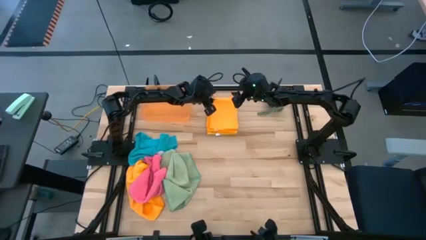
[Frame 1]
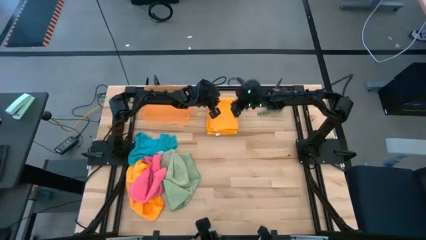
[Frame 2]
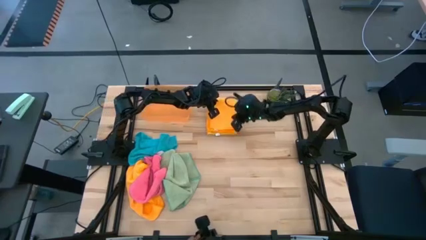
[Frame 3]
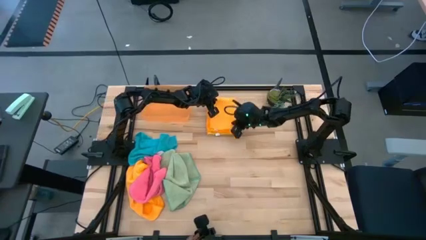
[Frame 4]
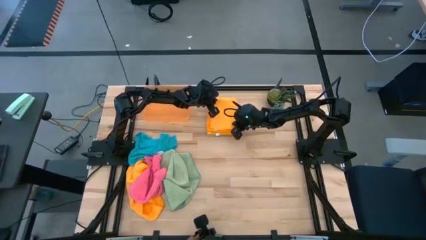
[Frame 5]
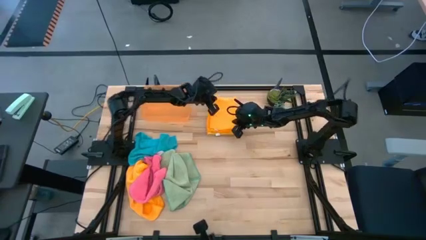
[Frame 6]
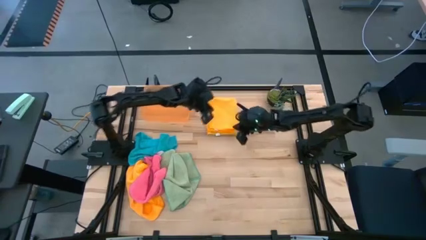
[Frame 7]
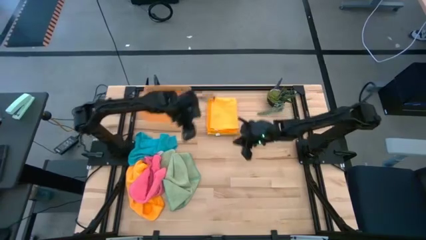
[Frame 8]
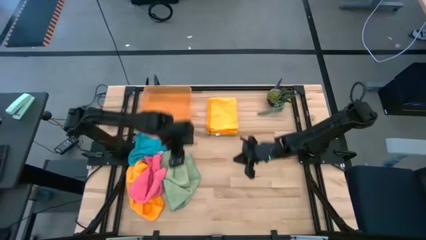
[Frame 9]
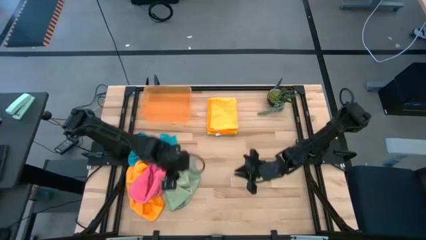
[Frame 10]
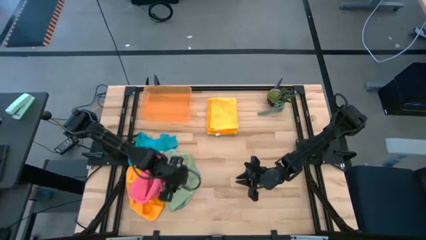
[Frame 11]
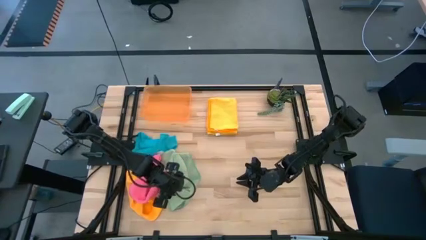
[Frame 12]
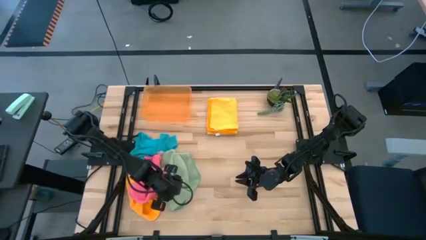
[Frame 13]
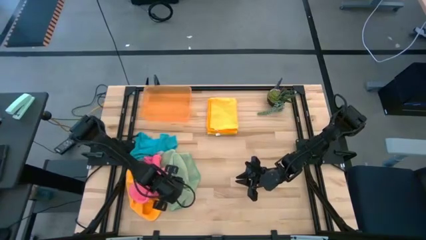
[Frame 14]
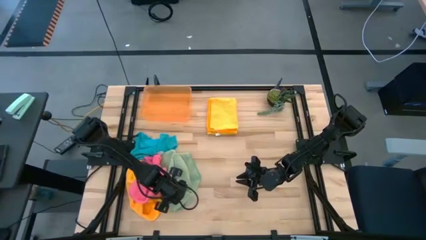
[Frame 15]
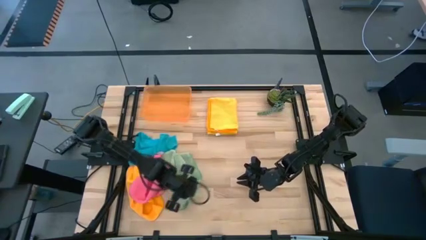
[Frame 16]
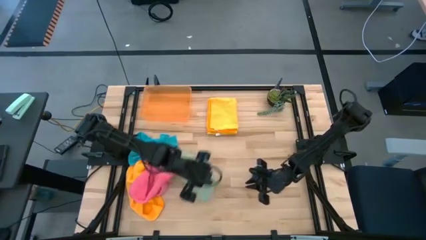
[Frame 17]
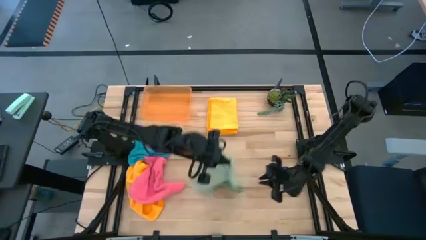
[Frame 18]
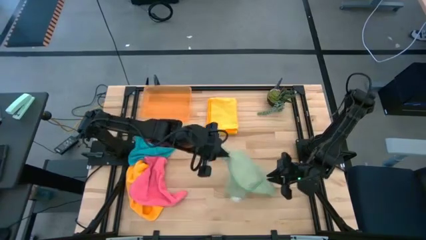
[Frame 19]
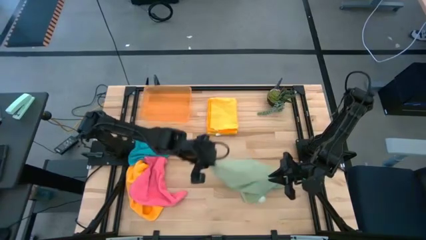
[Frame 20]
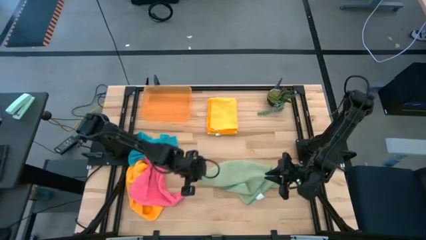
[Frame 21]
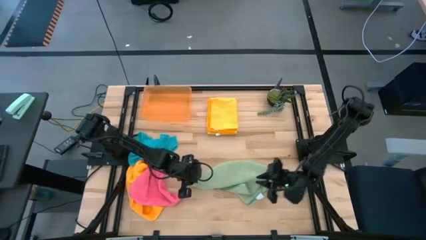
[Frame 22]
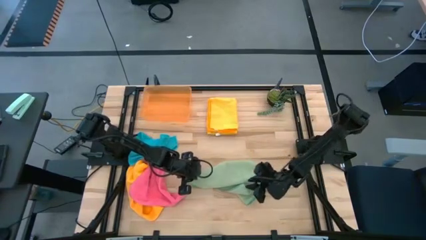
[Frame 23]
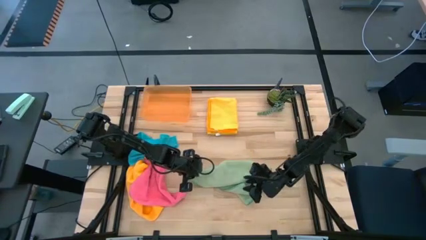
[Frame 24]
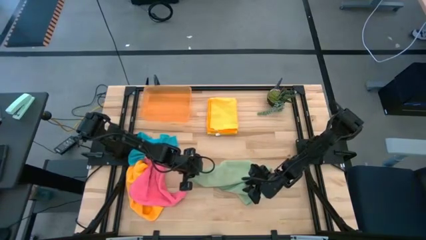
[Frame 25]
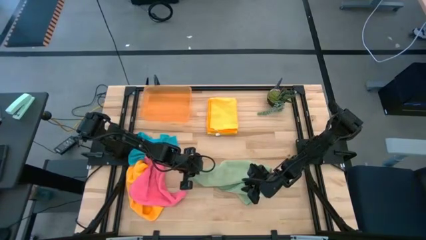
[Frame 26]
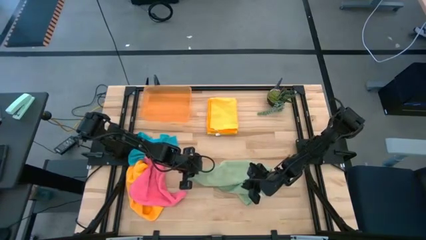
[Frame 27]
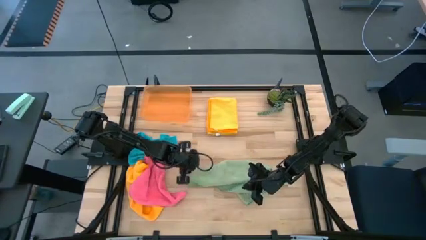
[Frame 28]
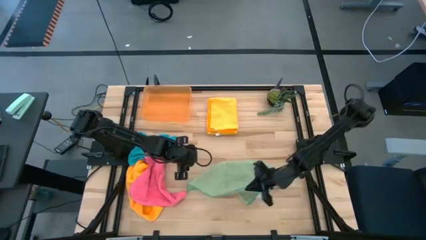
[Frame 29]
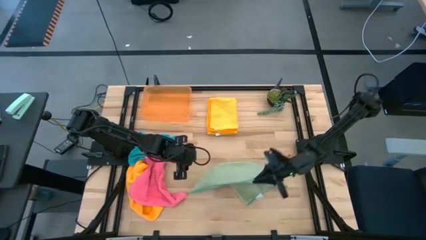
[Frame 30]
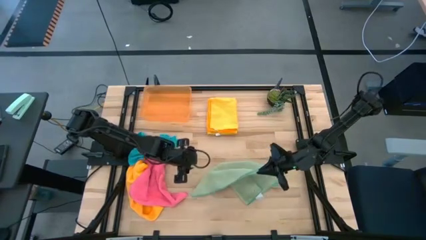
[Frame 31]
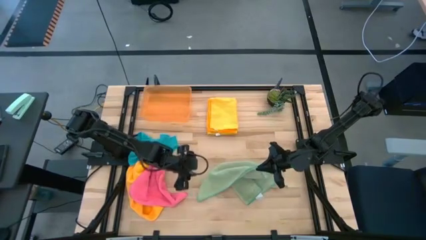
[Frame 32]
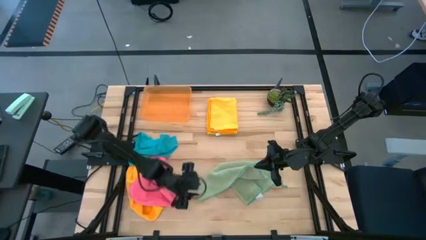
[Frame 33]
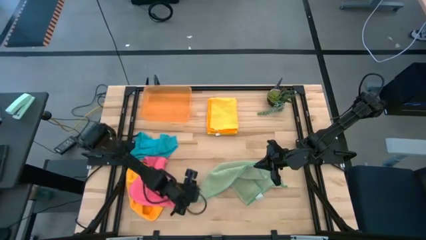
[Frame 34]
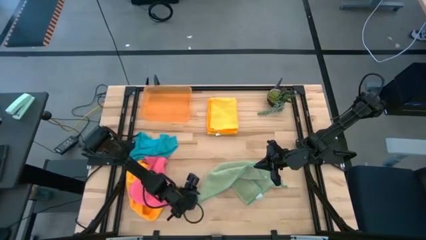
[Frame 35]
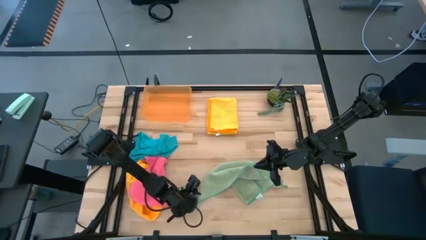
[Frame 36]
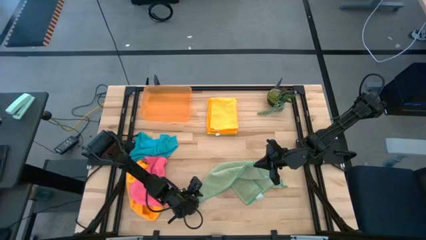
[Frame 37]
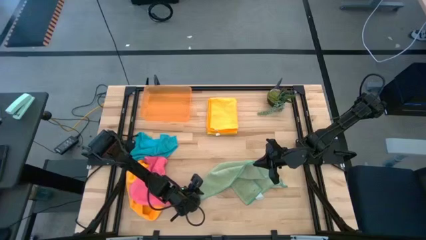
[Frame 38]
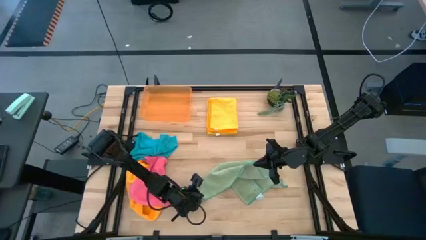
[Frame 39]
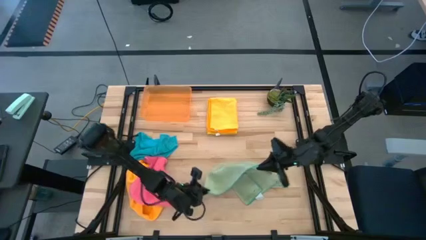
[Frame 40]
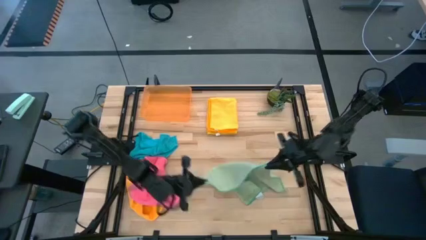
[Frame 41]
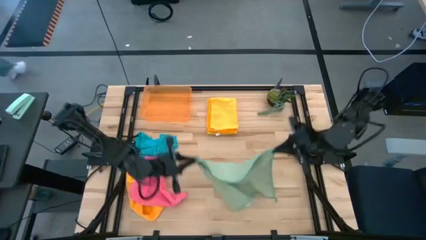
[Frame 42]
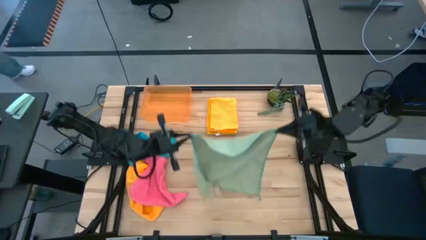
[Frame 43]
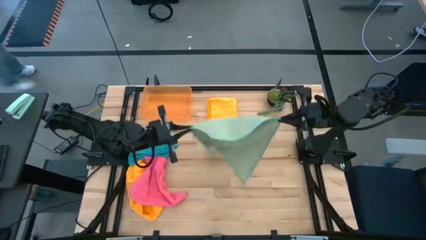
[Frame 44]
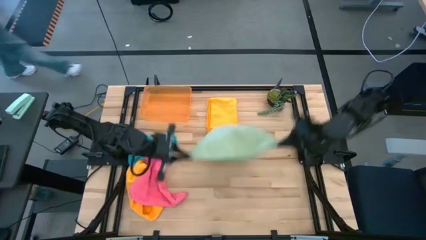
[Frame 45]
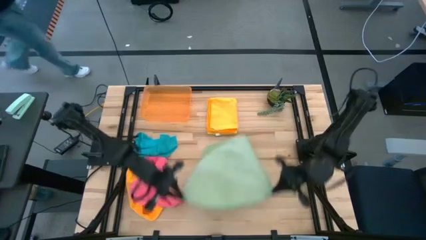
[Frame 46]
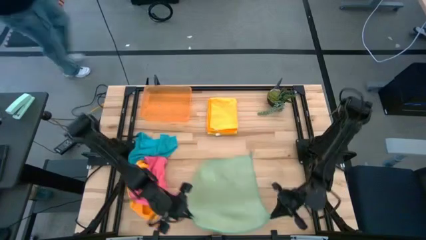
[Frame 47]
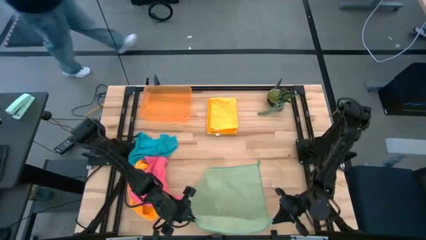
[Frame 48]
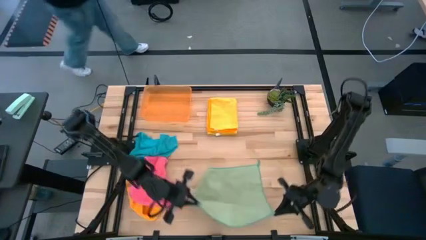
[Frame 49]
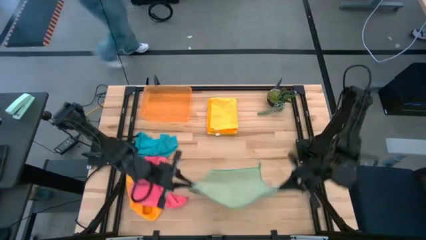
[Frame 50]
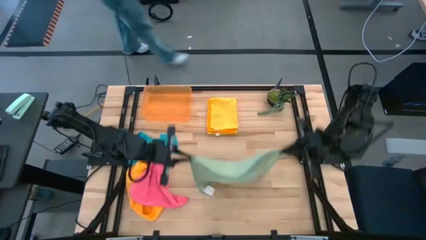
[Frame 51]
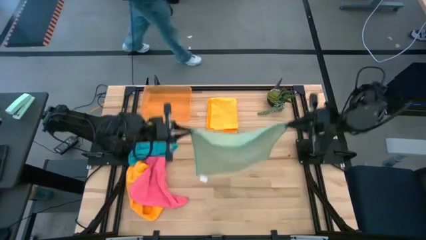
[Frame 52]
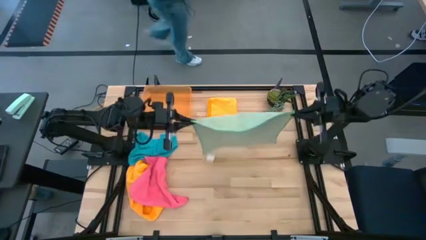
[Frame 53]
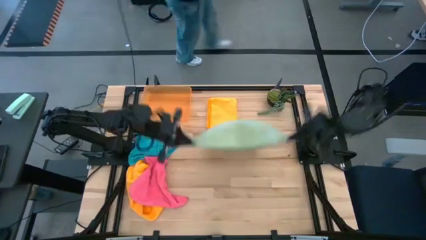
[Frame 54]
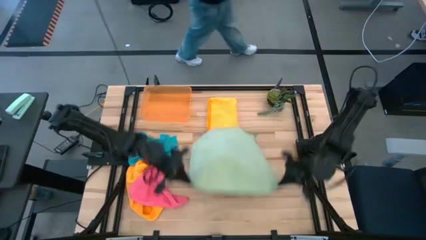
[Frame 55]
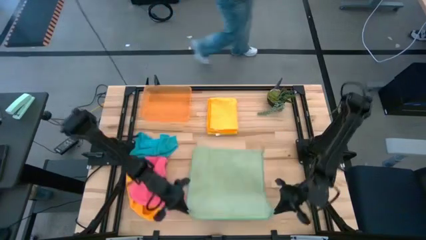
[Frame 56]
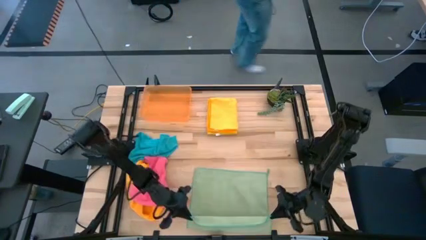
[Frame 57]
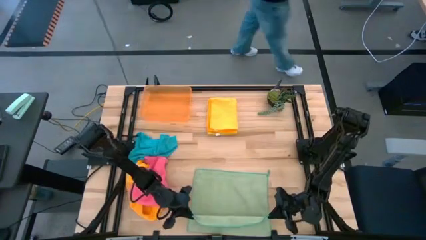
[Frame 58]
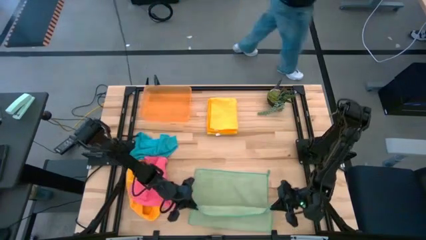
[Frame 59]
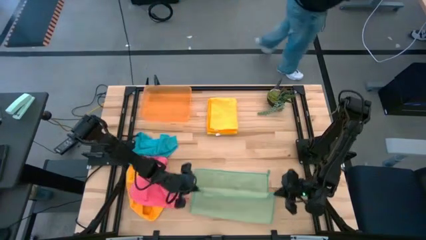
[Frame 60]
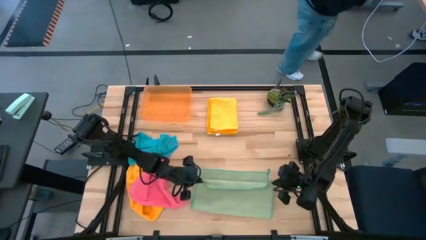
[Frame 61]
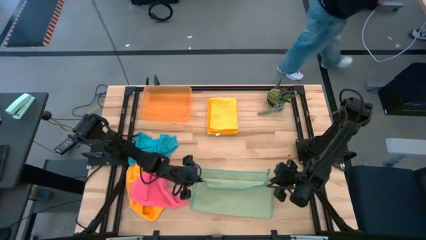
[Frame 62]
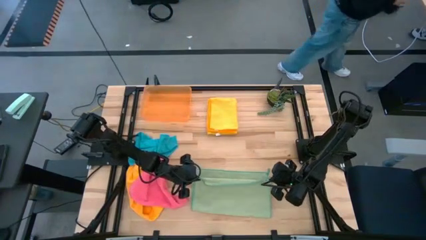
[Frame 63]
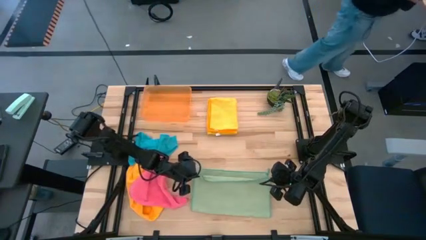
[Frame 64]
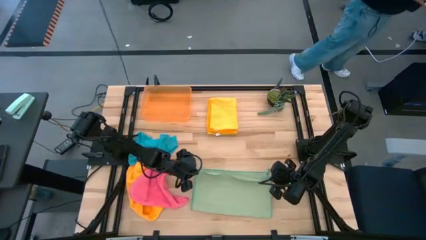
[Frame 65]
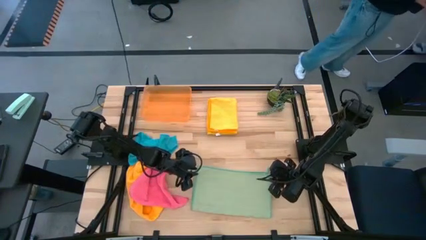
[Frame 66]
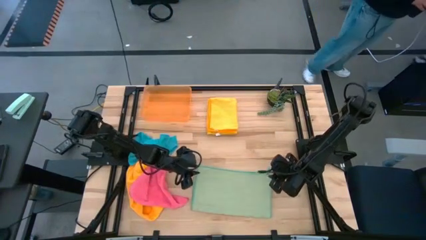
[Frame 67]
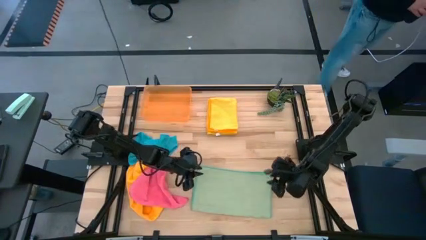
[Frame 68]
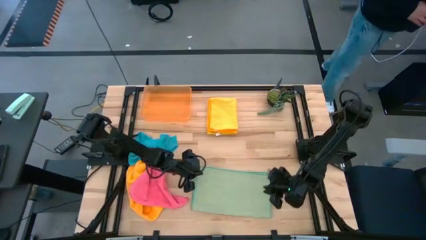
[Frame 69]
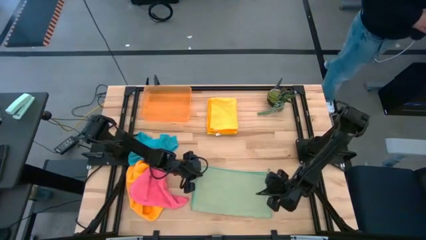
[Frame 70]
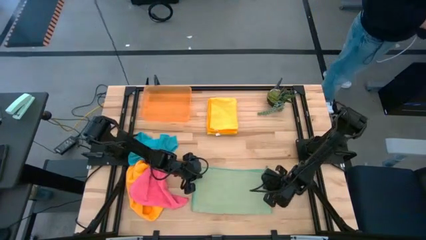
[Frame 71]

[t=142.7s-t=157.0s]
Task: Fold microfiber towels
Fold the light green towel

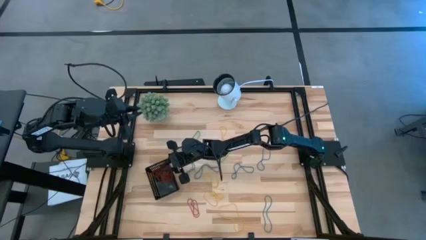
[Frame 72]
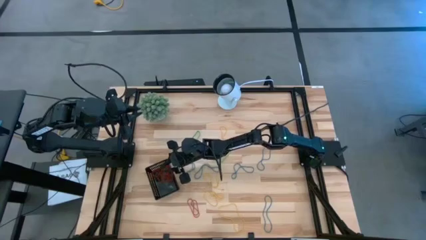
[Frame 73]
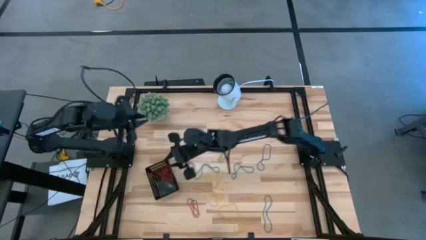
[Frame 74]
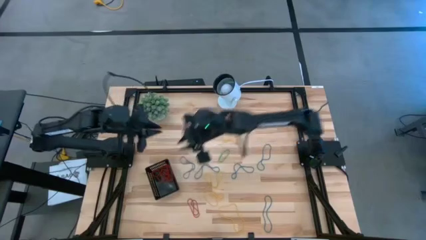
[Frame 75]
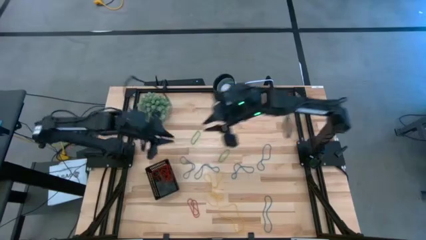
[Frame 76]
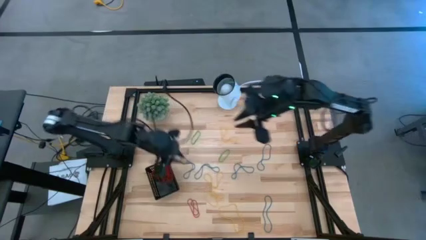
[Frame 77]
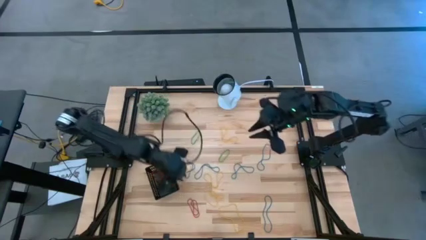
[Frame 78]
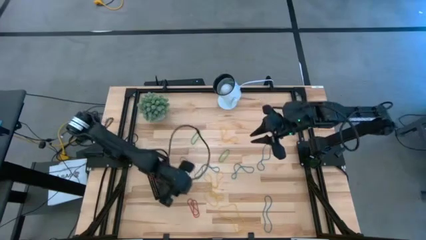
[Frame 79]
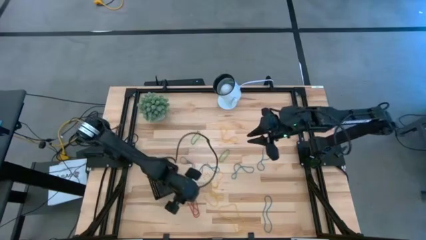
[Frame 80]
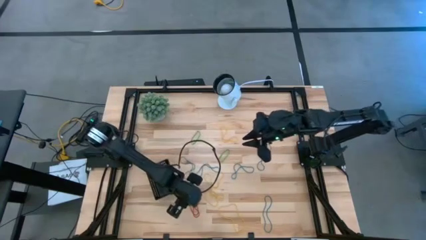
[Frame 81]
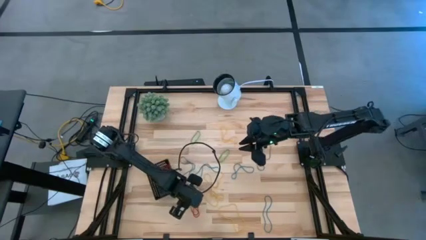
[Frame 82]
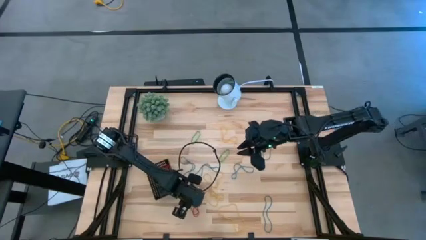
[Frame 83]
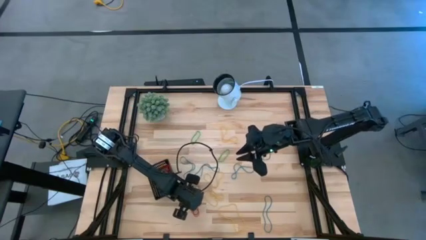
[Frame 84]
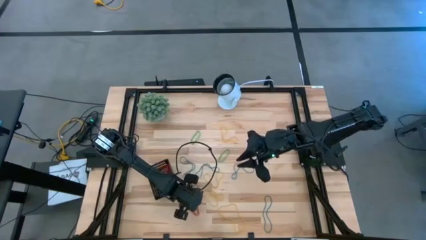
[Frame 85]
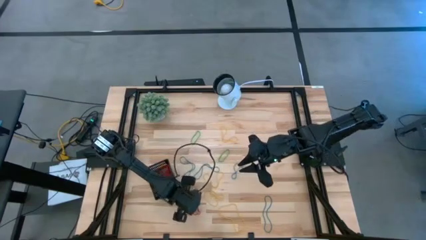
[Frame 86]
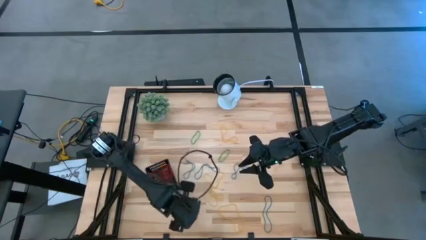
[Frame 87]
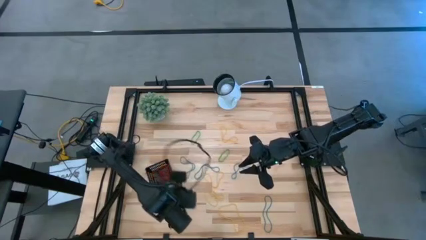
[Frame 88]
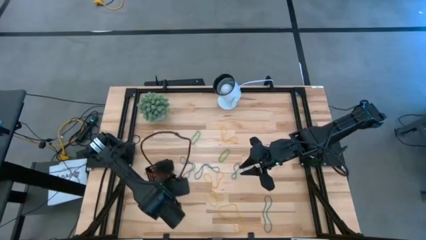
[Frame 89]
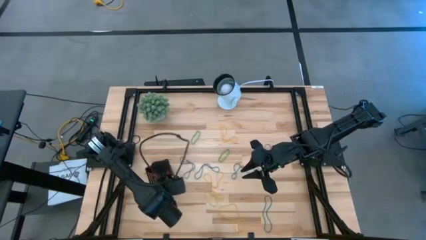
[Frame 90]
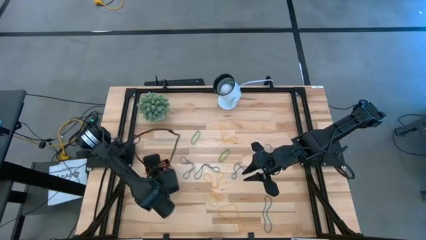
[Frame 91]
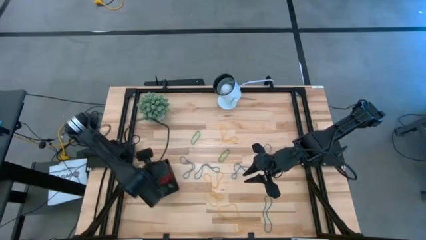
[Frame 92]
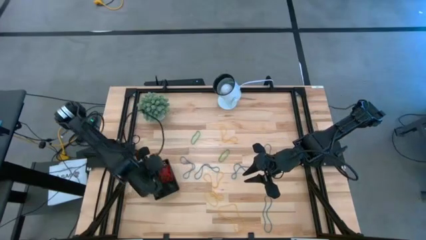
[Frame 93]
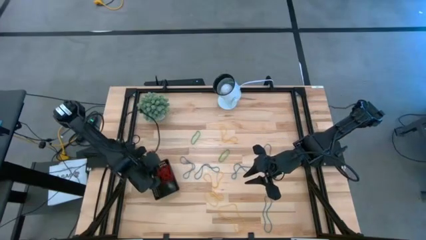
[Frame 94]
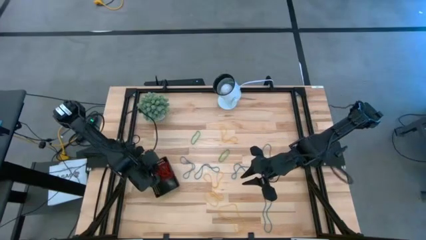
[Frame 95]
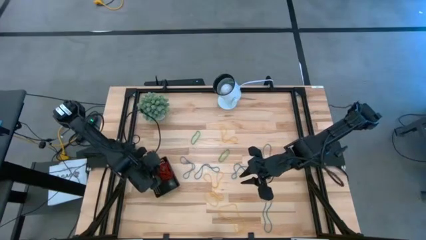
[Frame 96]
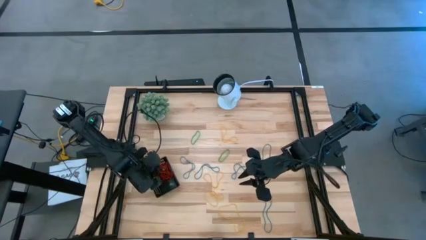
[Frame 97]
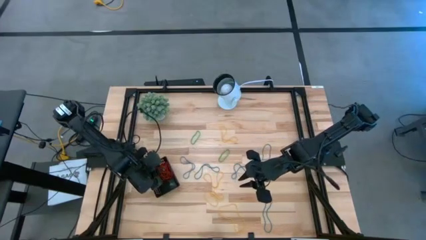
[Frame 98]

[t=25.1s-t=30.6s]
Task: Pick and place items into bin
Put the red rubber band into the black bin
